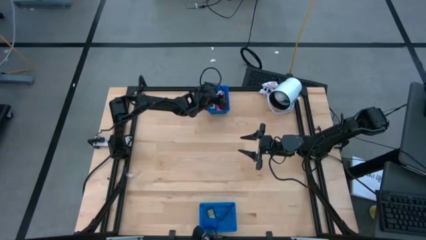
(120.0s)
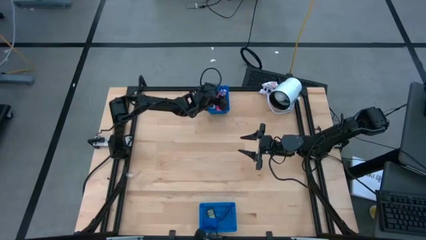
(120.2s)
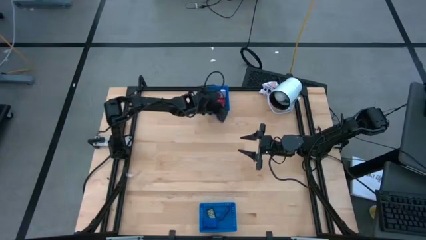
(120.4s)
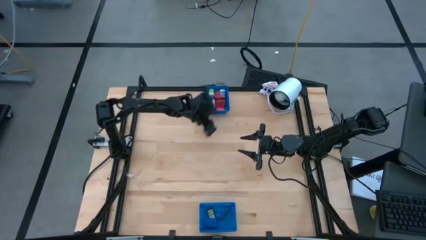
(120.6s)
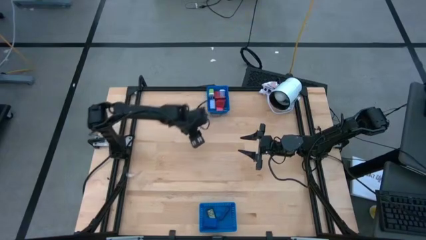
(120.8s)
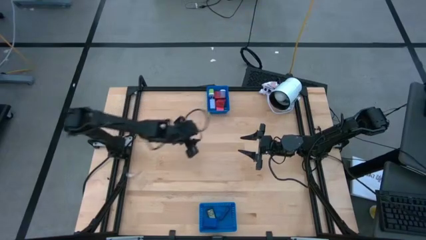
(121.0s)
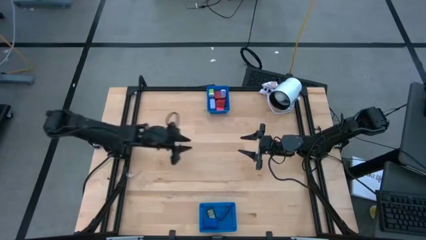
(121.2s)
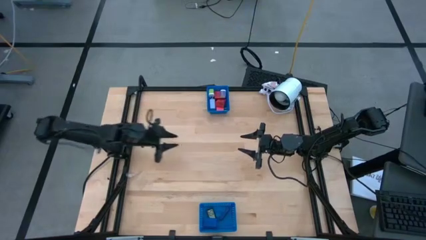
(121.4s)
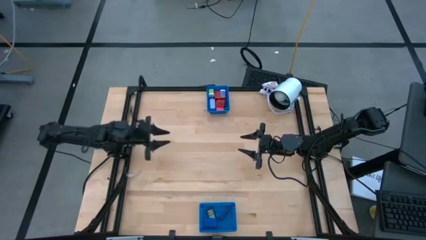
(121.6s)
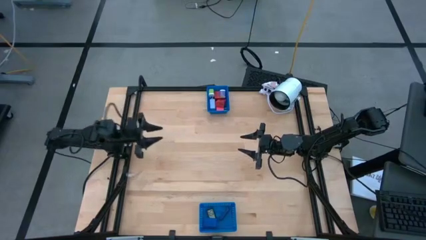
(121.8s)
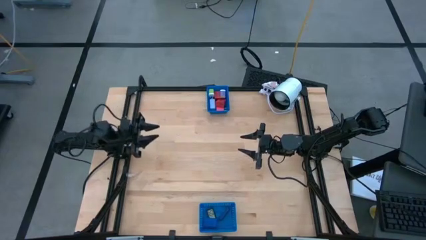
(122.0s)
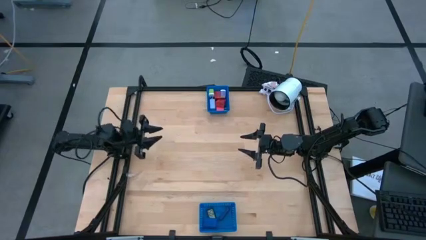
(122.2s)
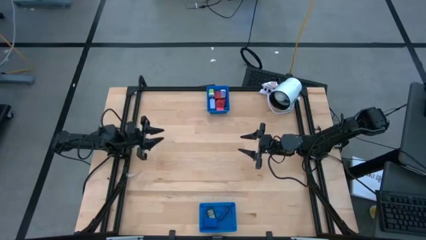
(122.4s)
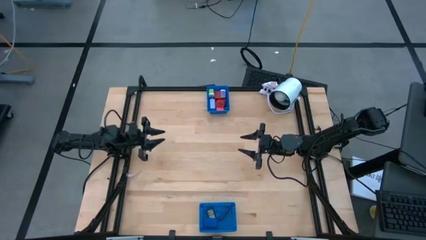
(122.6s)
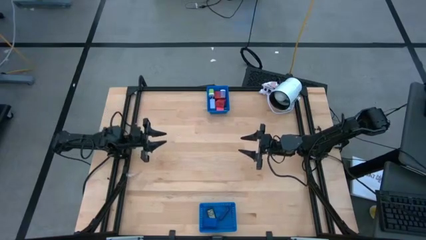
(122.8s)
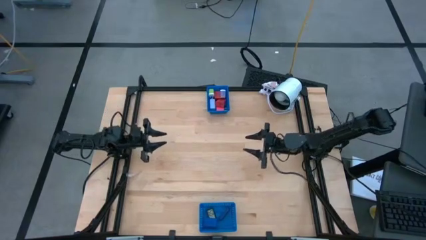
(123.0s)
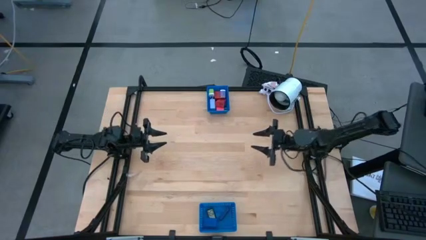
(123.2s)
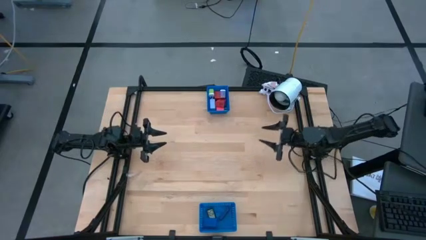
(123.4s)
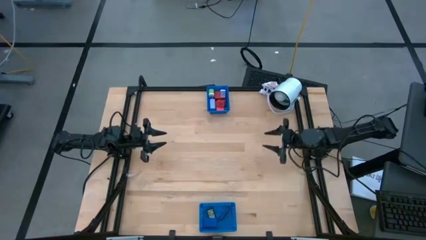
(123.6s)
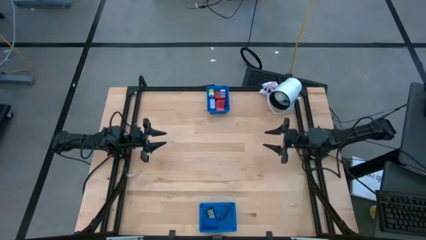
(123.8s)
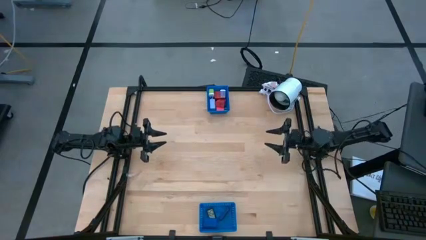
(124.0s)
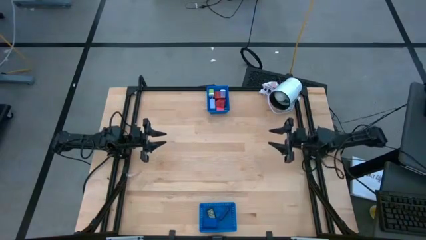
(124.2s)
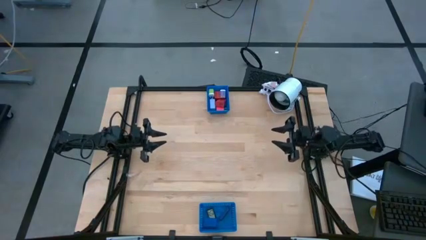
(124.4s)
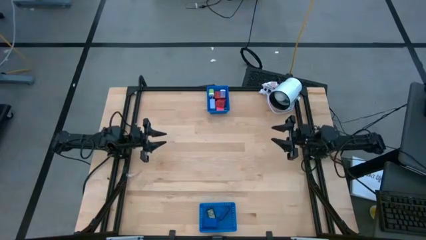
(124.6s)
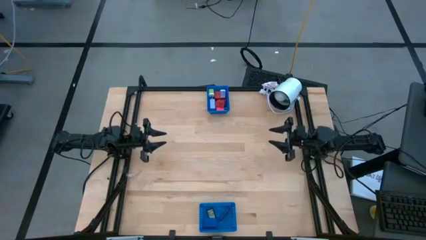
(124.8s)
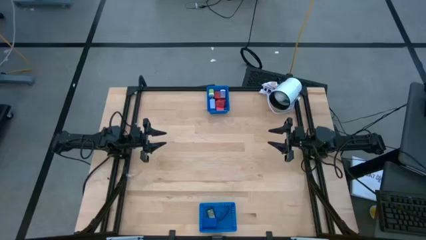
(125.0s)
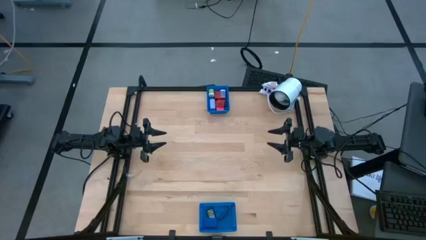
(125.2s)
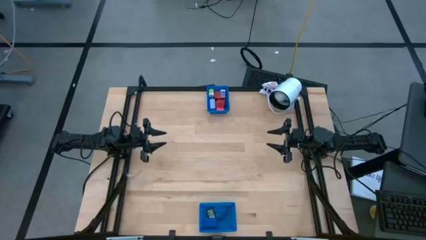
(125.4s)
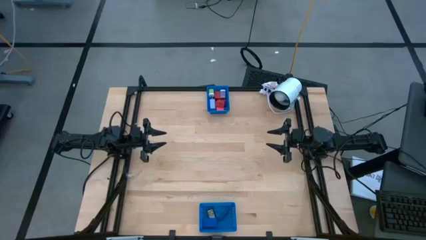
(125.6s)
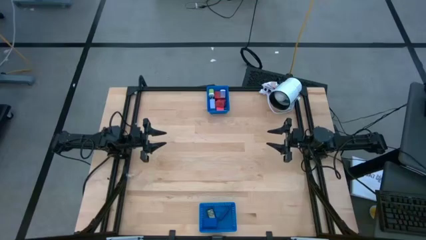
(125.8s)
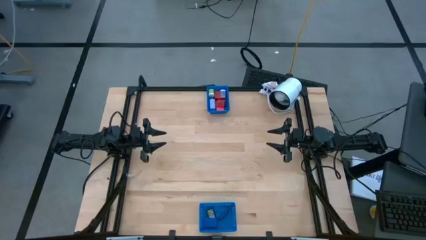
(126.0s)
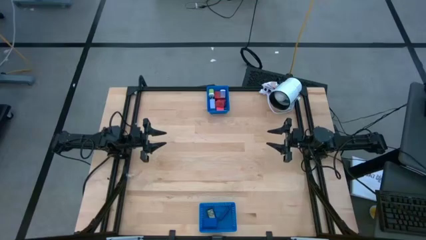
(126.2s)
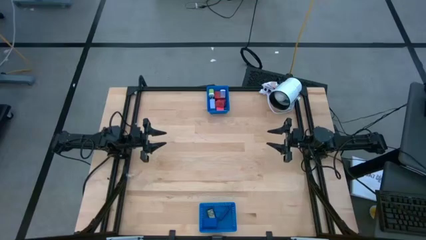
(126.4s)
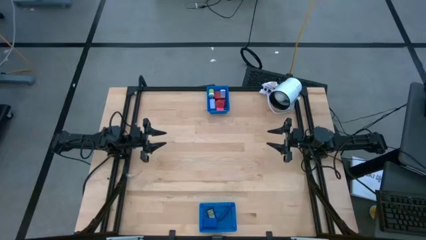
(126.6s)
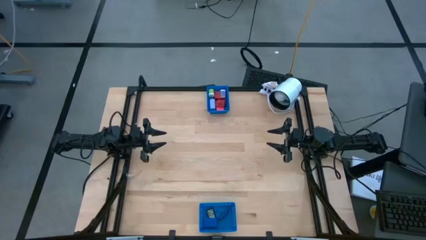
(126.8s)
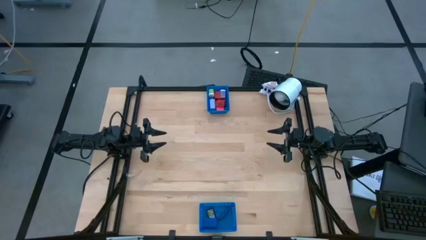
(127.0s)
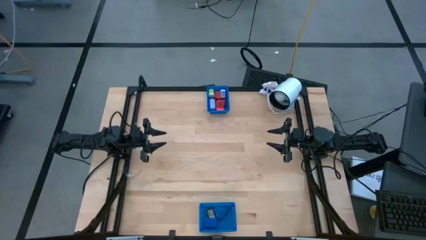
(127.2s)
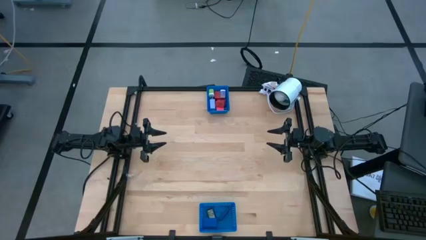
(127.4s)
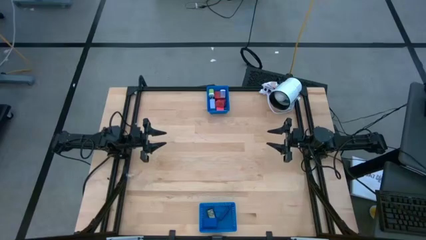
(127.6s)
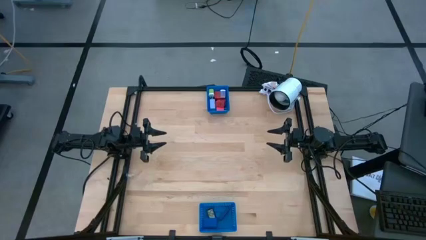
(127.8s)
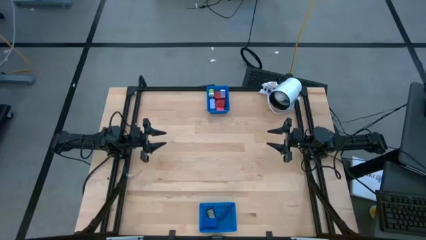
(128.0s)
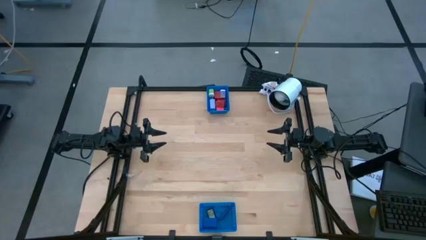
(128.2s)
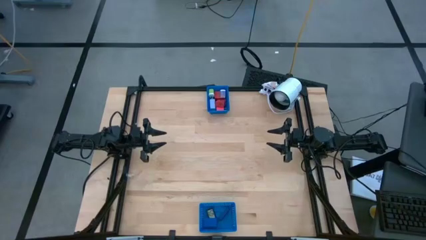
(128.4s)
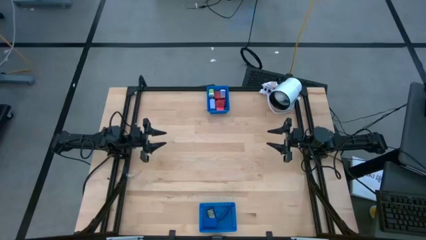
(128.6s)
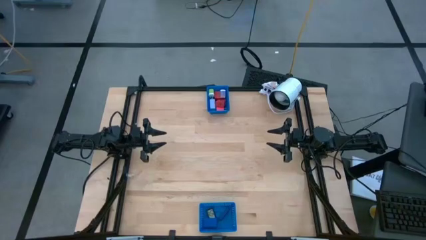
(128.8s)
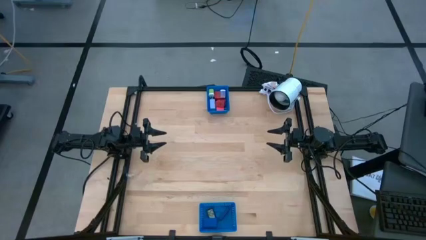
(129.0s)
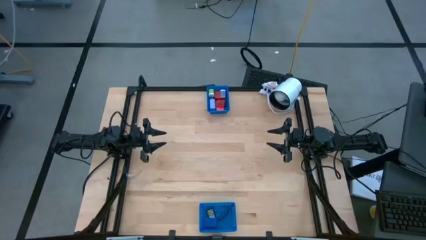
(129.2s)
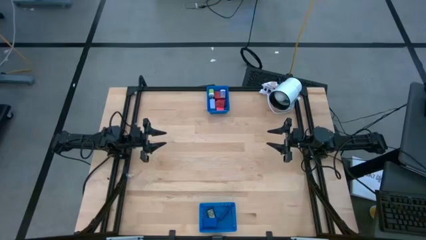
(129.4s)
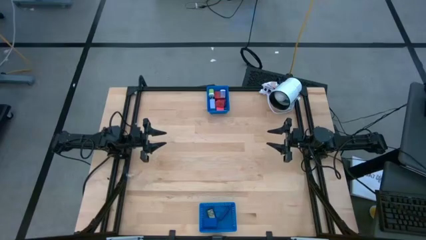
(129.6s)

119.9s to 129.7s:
Task: Pick & Place Office items
Return to Home Position
